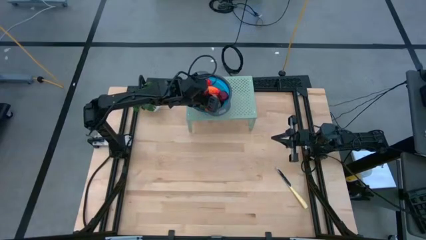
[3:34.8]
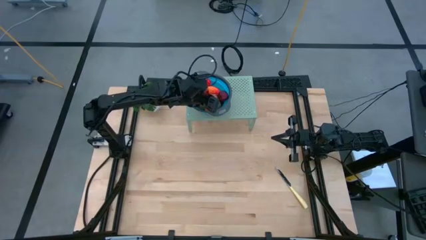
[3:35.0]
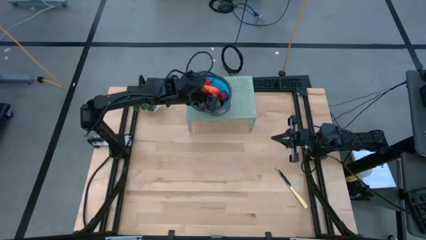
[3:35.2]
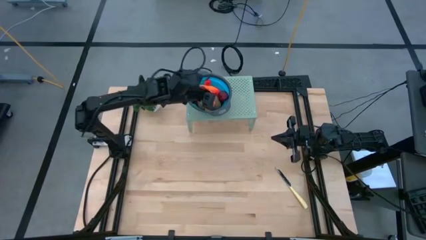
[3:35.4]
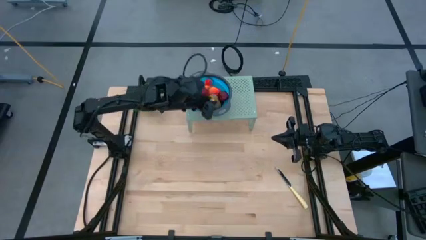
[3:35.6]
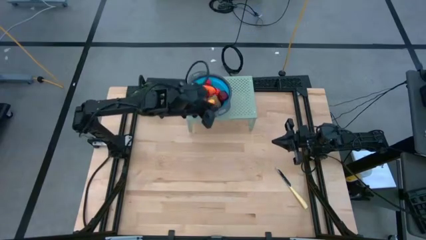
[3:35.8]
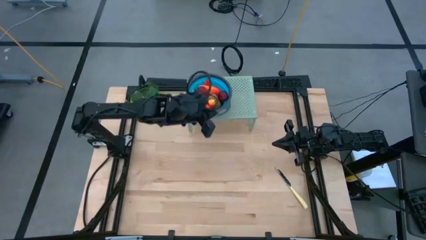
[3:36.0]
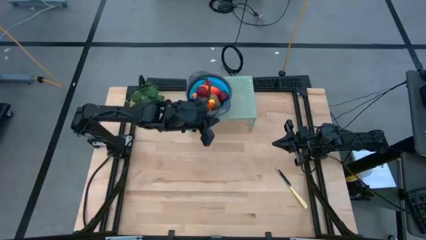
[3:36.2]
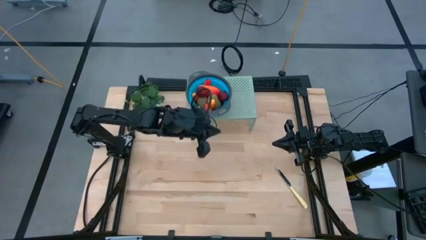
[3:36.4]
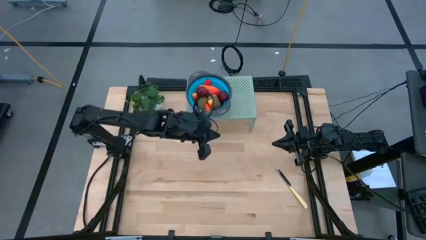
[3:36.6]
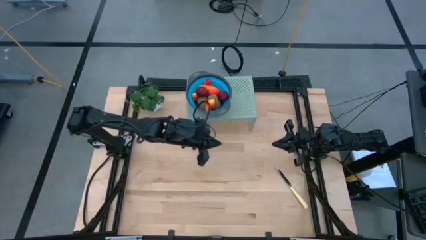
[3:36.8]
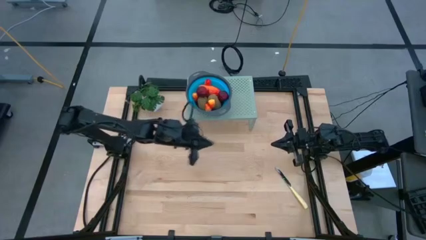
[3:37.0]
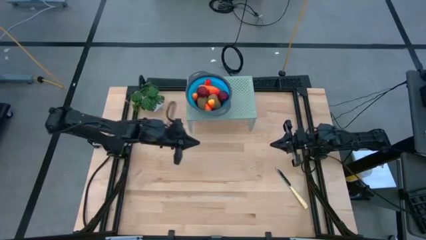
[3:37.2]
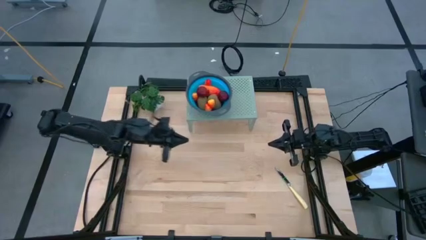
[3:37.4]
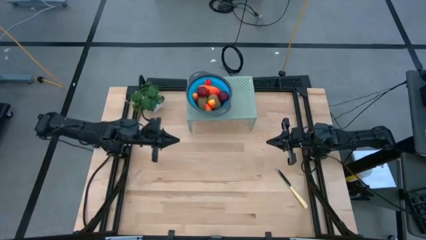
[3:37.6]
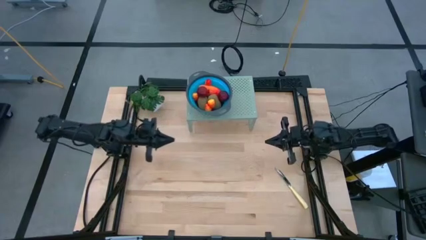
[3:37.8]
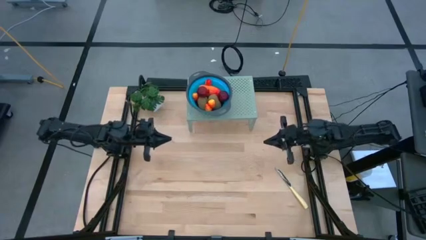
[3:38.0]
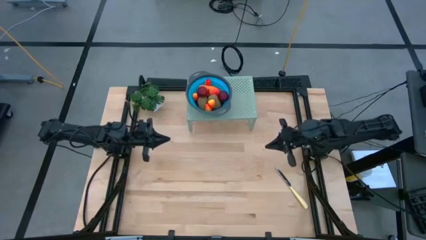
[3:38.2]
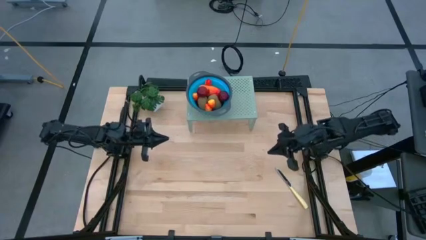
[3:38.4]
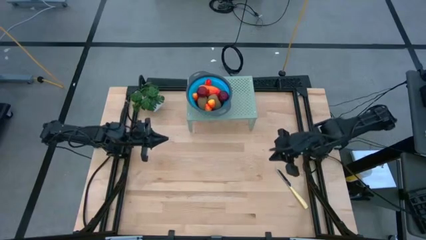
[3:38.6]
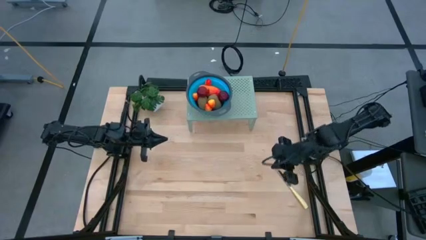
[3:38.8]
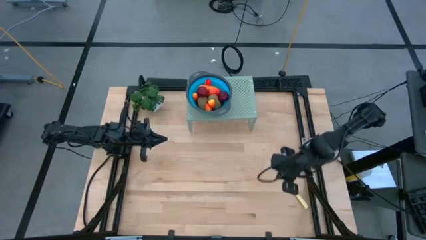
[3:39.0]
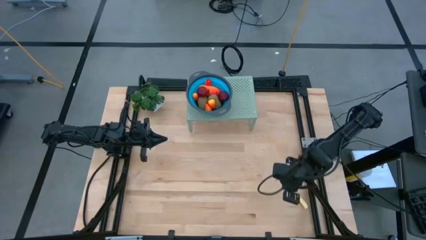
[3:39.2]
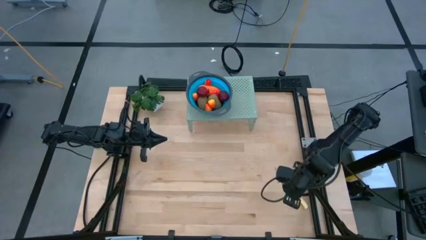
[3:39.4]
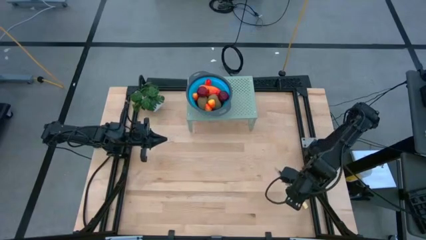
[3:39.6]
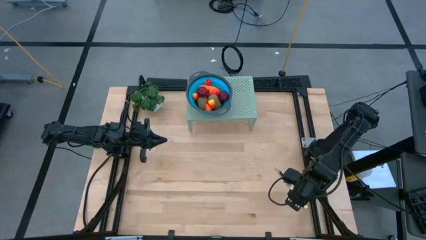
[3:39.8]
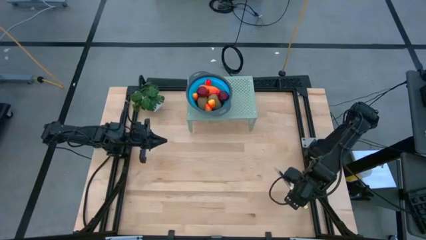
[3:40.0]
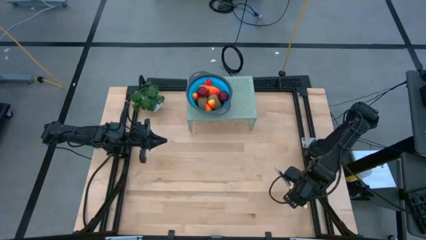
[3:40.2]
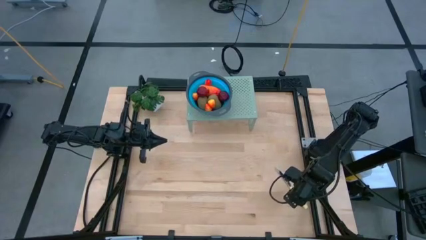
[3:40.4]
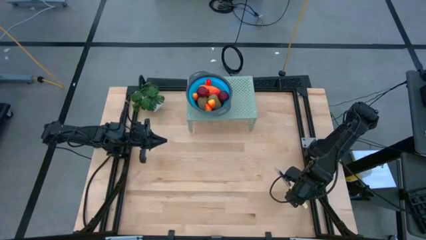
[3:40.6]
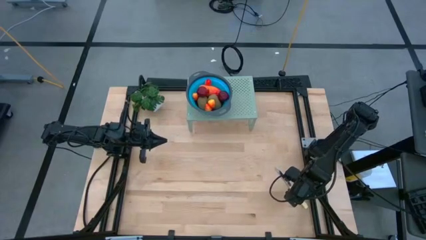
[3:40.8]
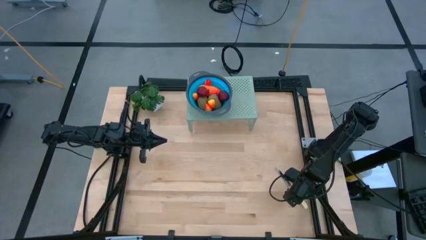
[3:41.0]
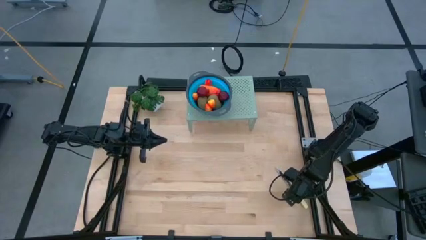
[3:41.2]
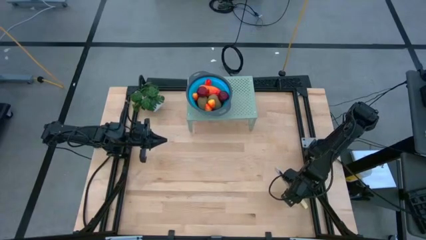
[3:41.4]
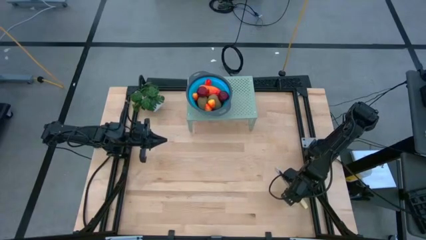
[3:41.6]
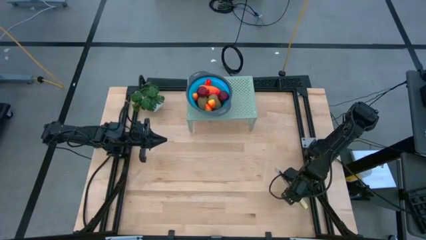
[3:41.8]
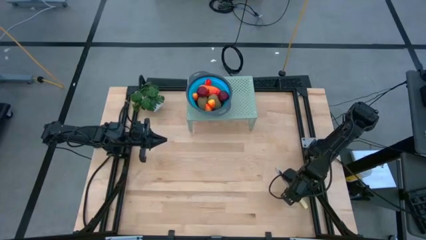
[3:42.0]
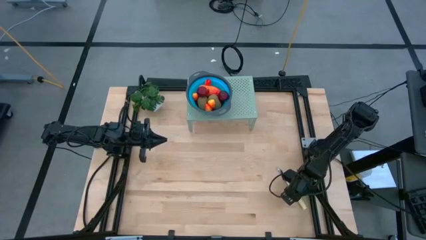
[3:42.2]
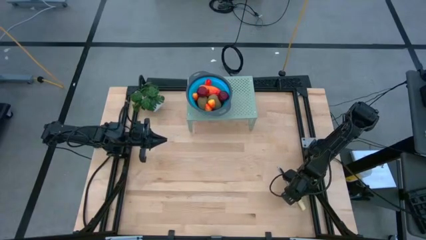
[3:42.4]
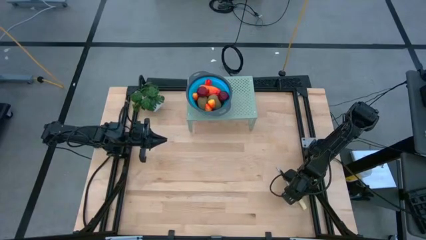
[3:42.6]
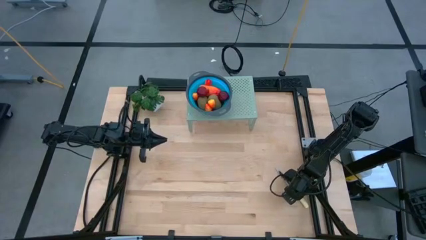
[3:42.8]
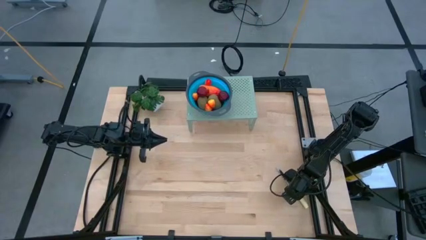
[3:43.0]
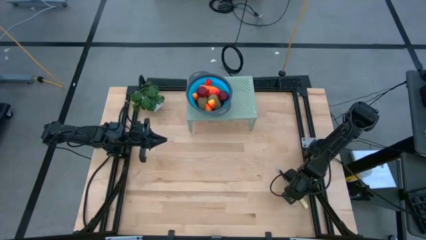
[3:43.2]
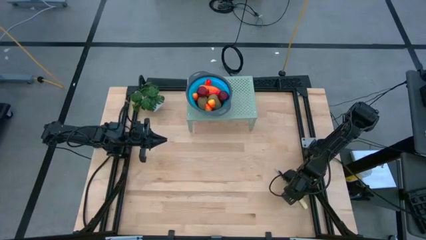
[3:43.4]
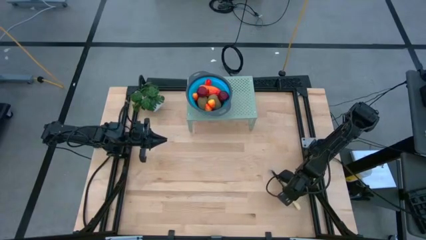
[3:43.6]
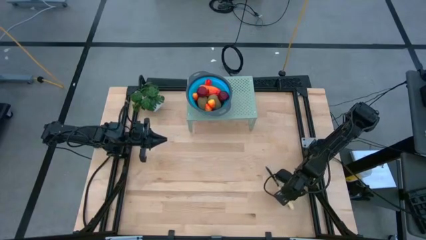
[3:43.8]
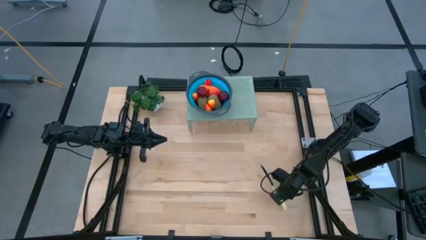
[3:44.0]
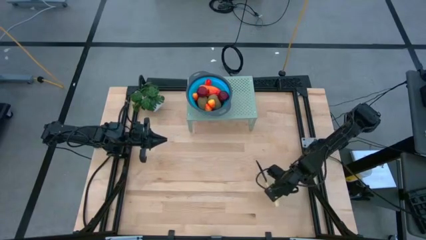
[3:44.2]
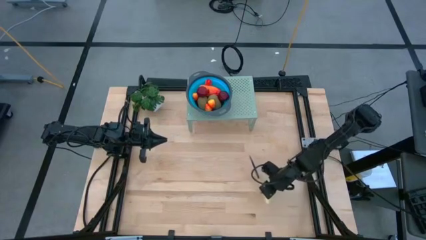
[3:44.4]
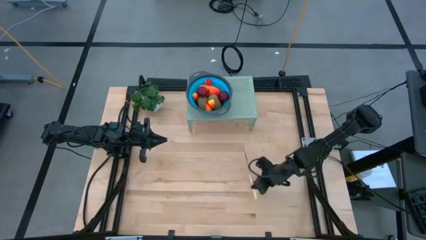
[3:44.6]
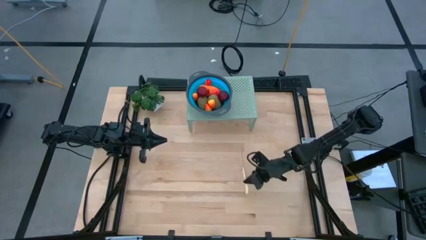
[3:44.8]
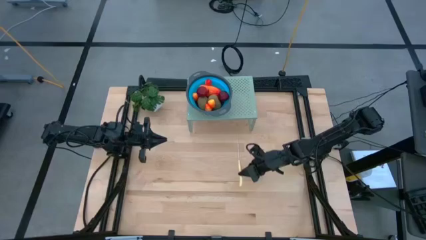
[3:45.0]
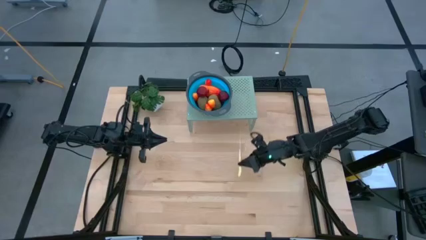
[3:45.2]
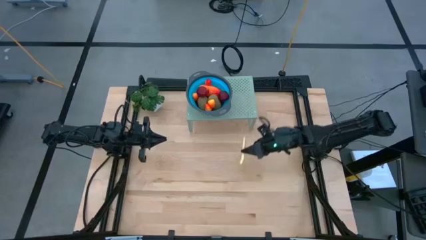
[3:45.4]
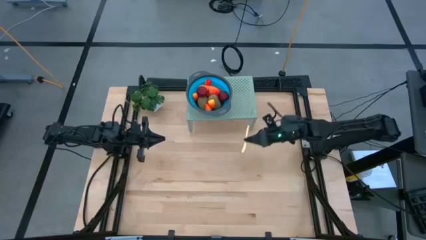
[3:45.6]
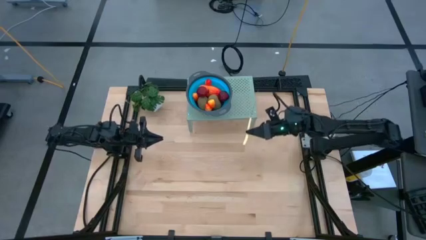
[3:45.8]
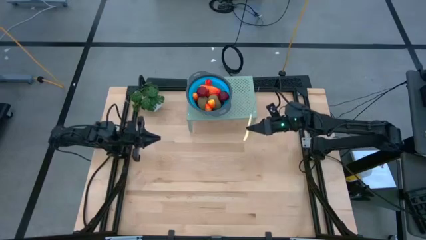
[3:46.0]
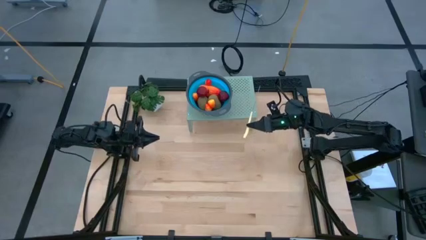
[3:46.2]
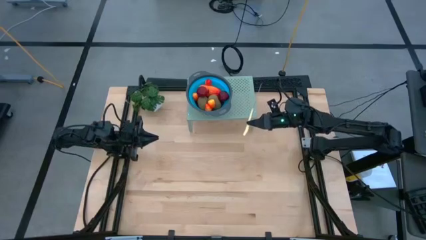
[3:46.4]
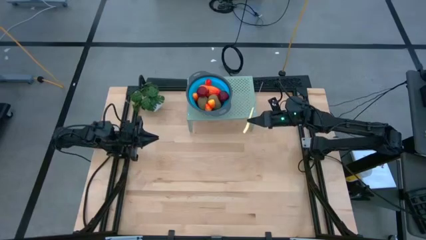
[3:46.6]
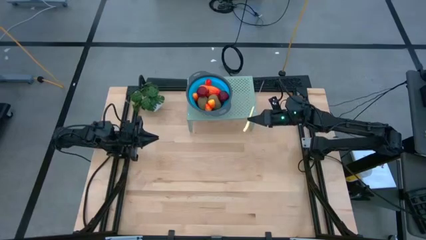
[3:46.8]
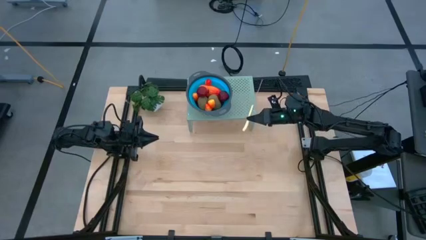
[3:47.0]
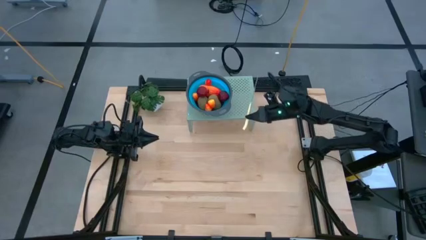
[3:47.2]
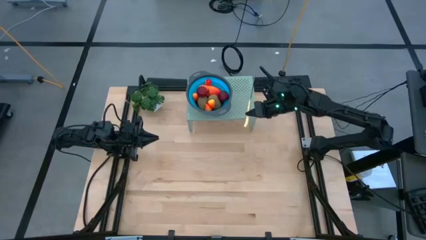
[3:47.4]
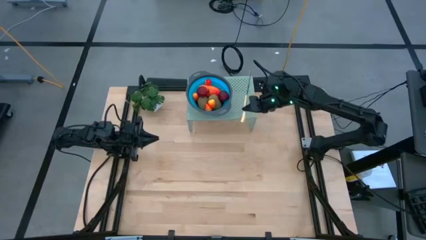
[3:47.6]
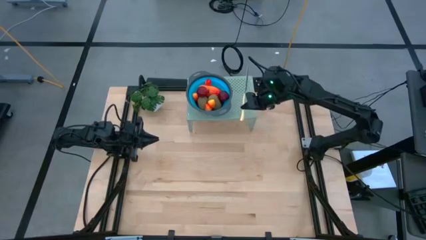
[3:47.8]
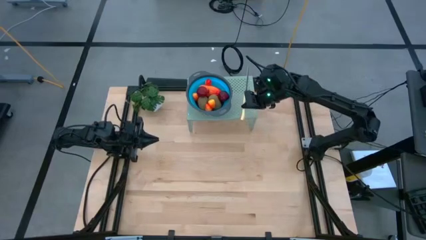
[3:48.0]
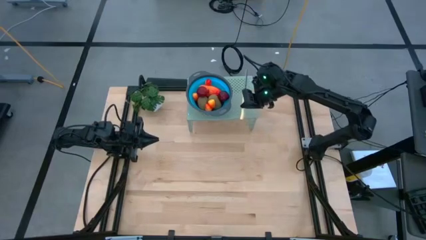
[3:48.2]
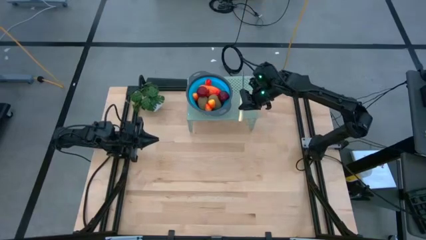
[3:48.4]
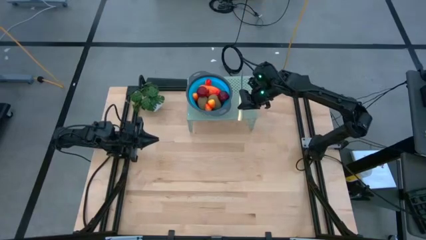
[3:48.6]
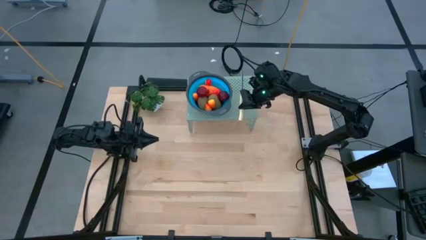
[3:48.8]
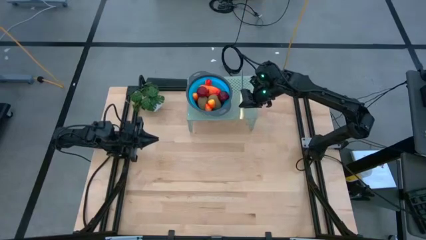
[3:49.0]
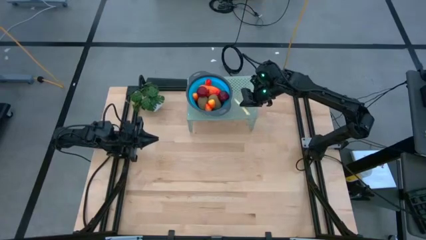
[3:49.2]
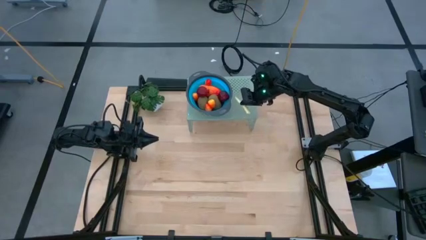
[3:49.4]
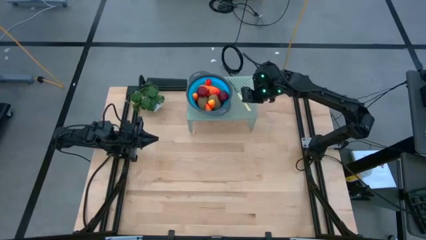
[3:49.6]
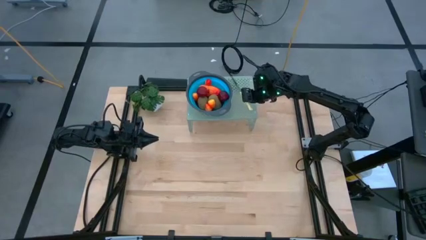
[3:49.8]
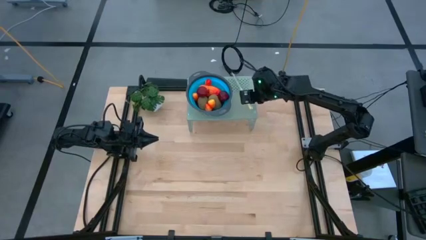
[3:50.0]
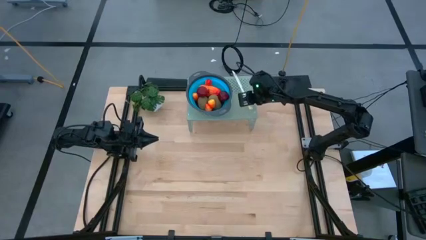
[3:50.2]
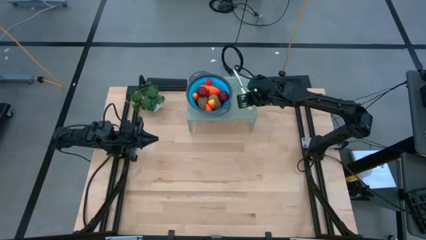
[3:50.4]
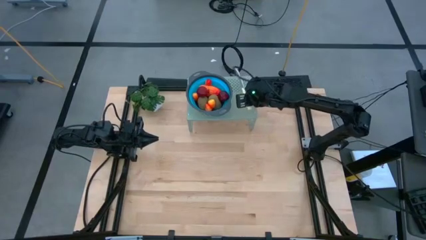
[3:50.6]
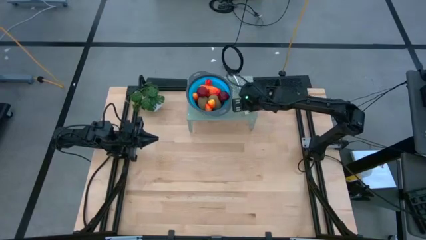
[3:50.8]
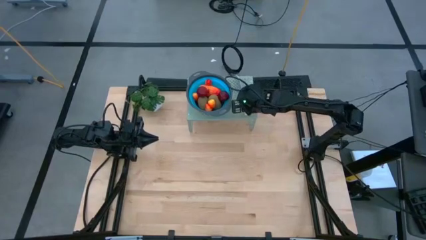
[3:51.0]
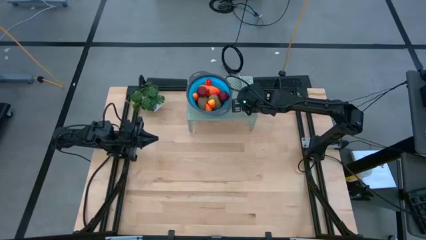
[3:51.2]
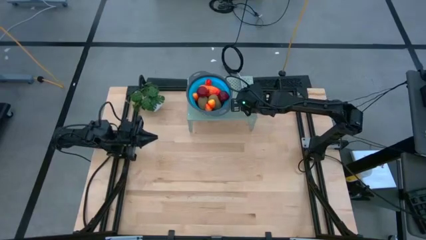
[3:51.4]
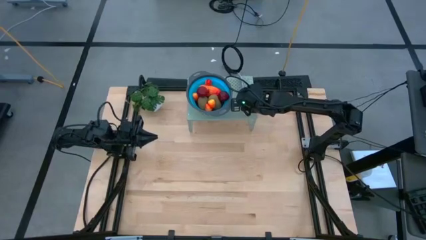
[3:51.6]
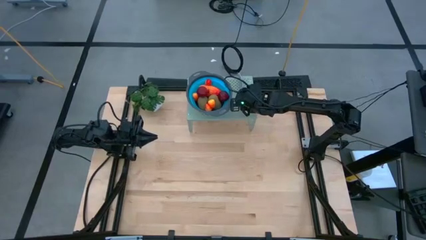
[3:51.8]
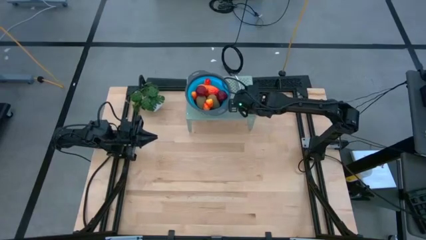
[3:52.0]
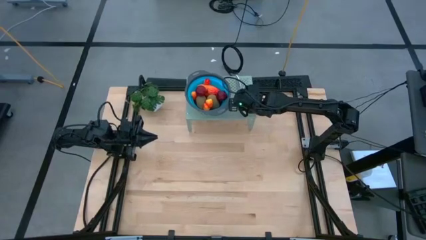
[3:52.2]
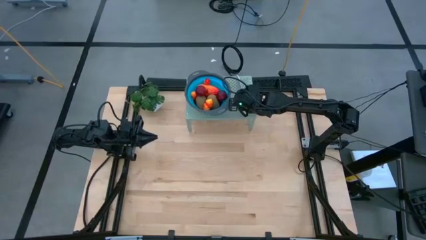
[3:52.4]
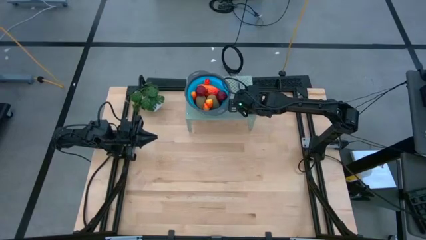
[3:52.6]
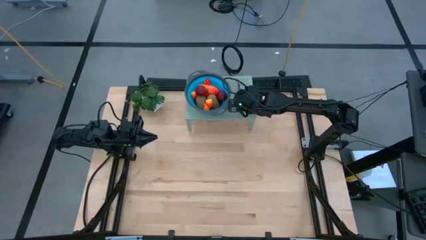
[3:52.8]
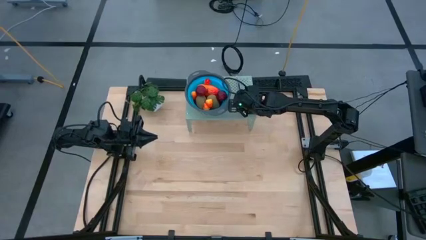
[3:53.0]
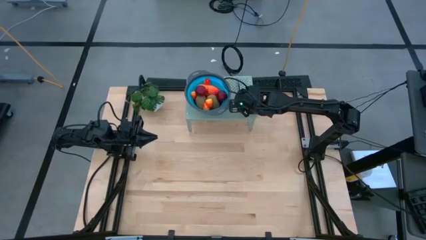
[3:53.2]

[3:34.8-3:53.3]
Task: Pick & Place Fruit
Put the table knife on the shelf
